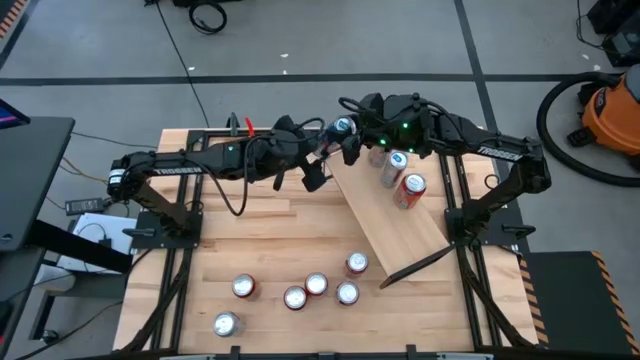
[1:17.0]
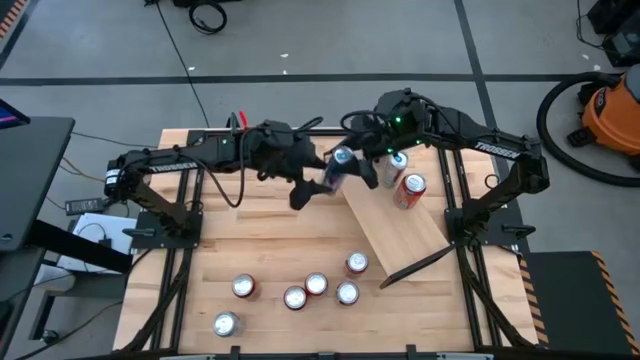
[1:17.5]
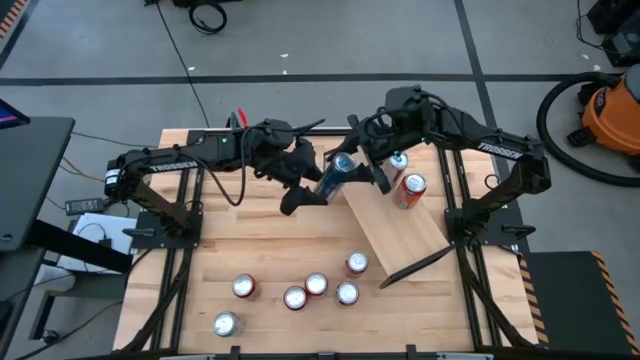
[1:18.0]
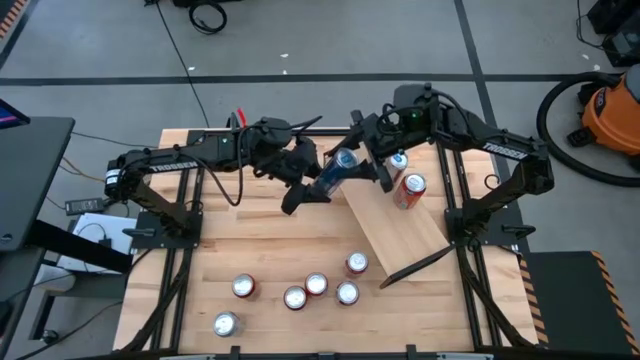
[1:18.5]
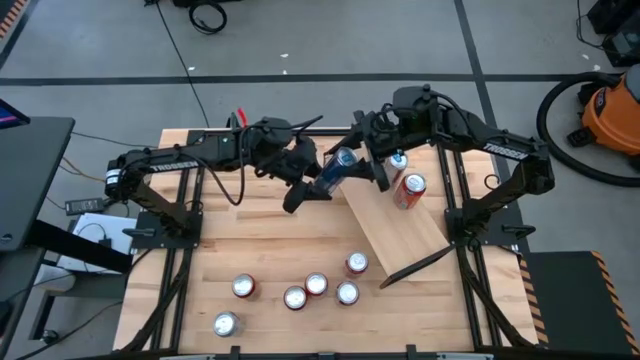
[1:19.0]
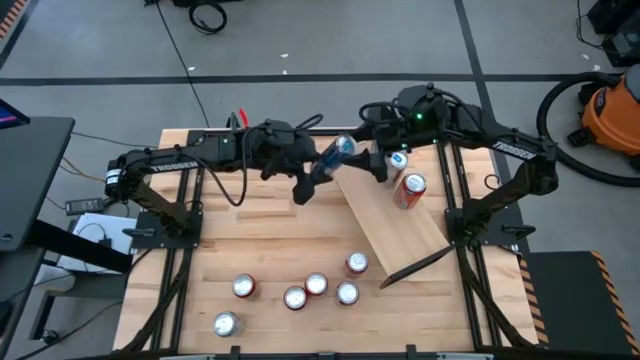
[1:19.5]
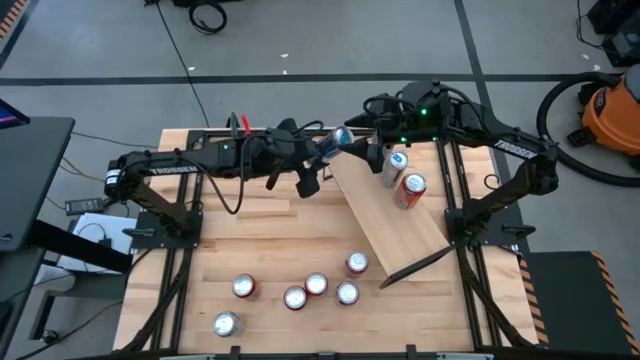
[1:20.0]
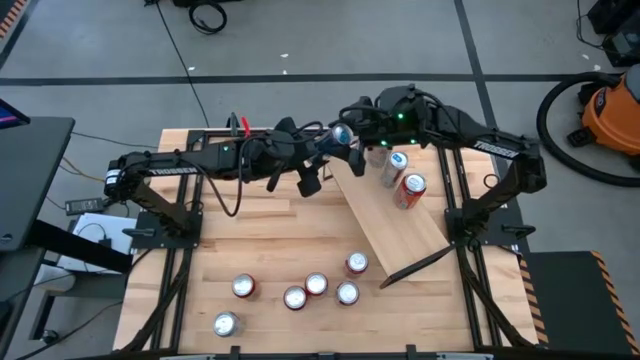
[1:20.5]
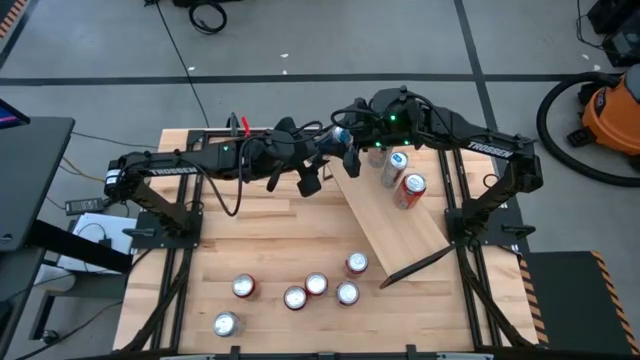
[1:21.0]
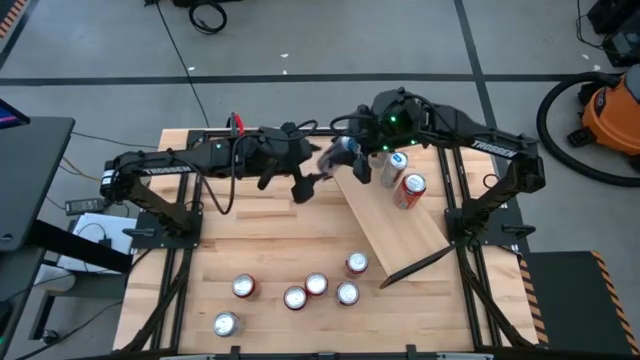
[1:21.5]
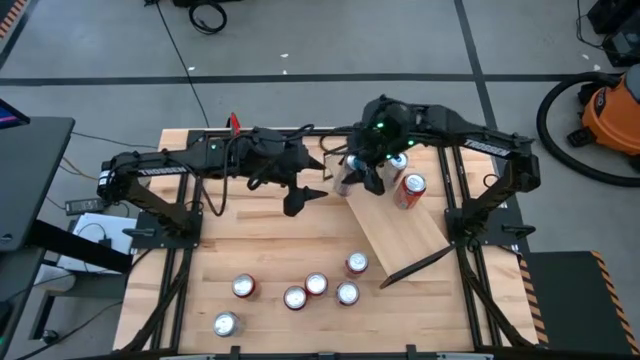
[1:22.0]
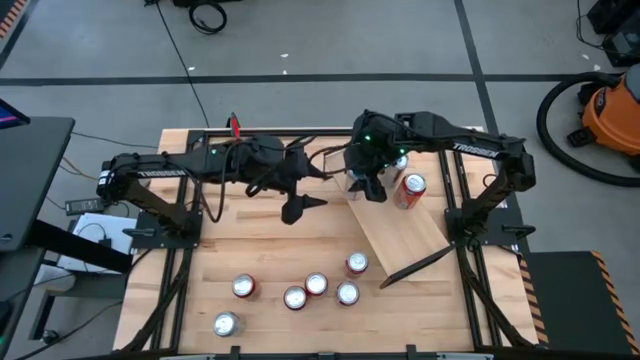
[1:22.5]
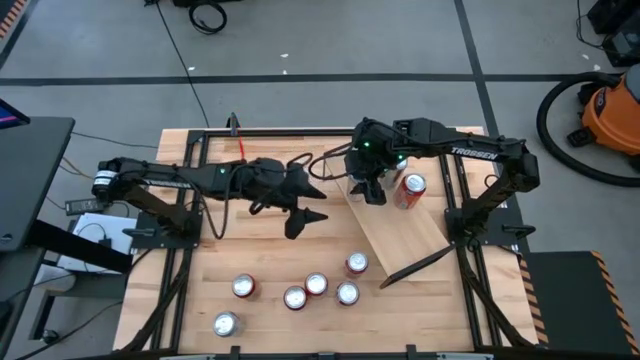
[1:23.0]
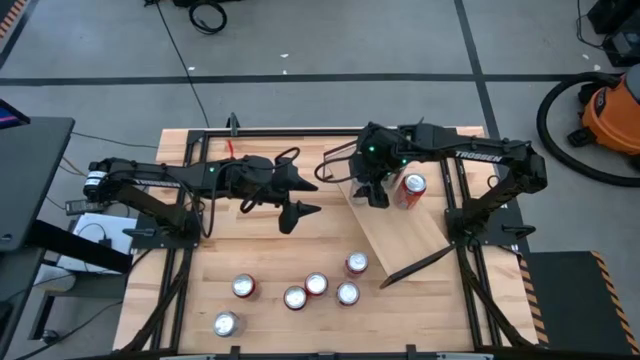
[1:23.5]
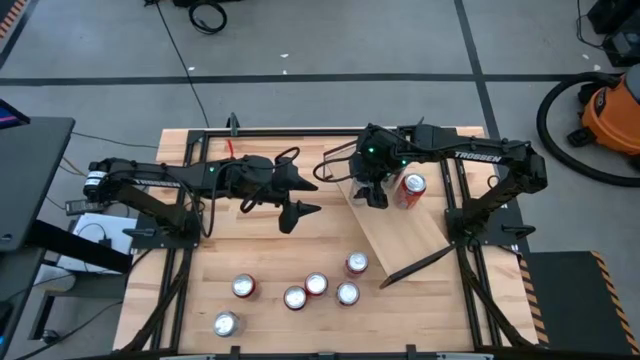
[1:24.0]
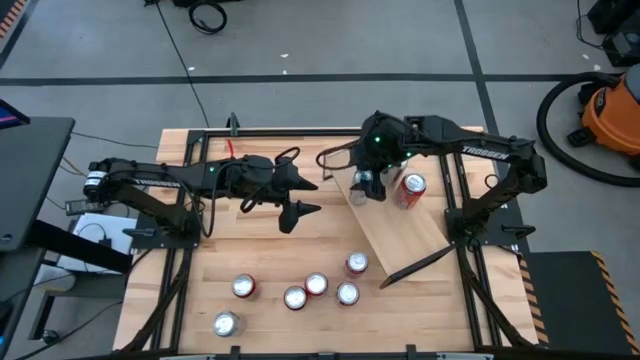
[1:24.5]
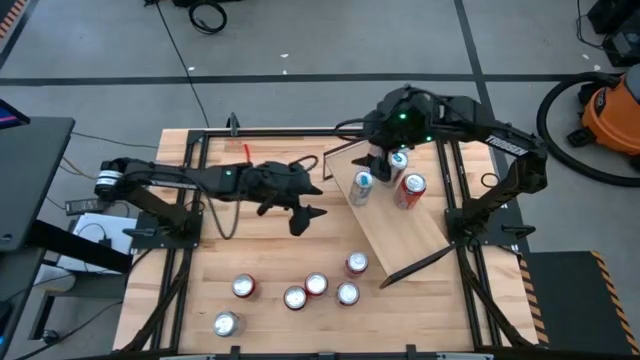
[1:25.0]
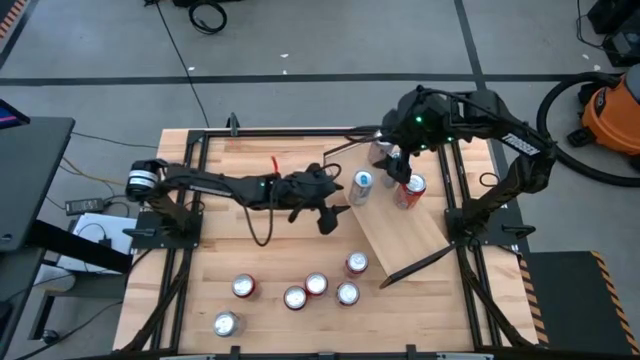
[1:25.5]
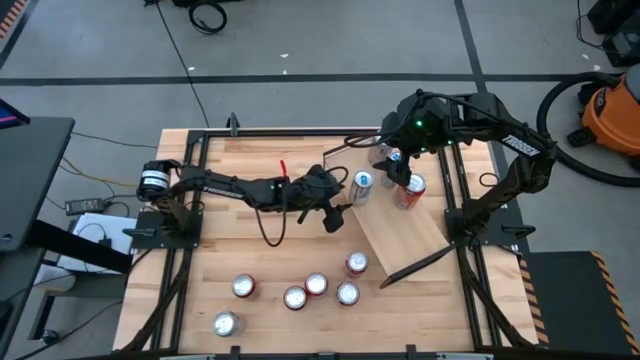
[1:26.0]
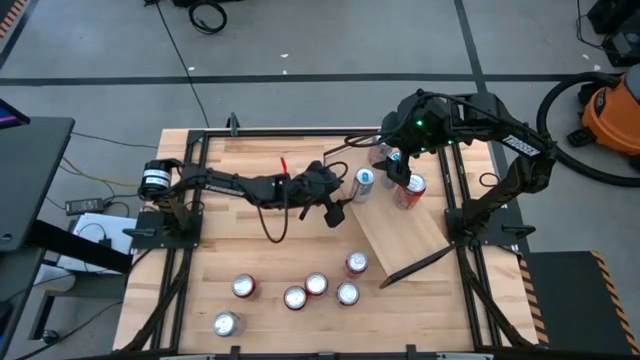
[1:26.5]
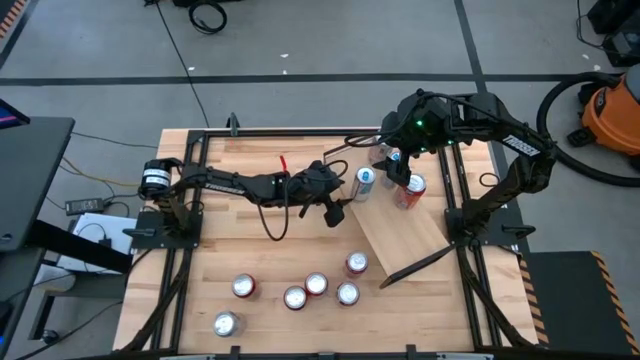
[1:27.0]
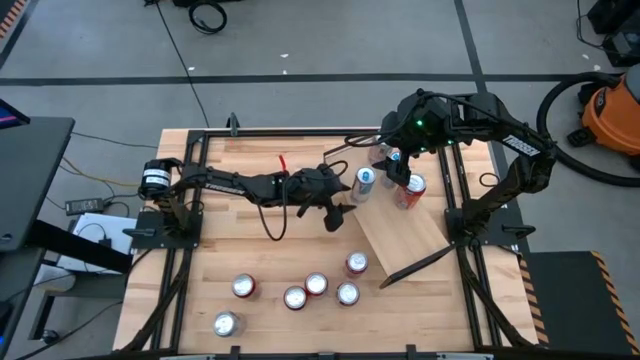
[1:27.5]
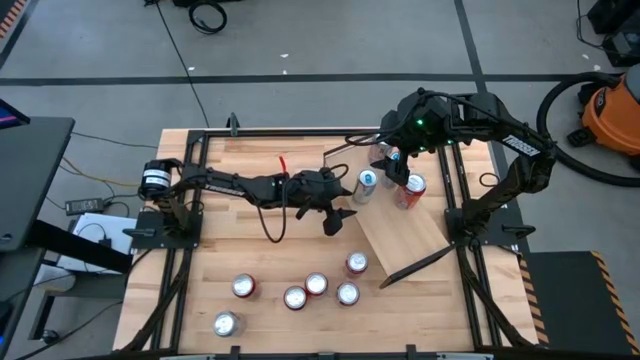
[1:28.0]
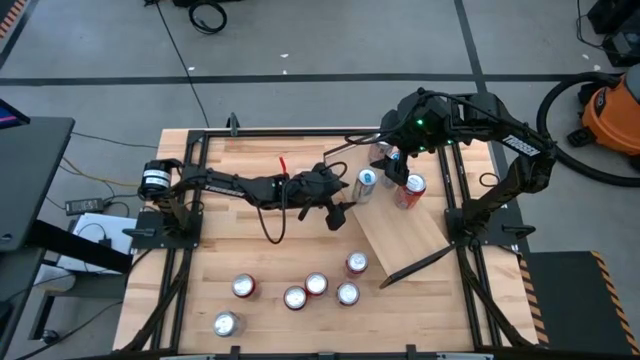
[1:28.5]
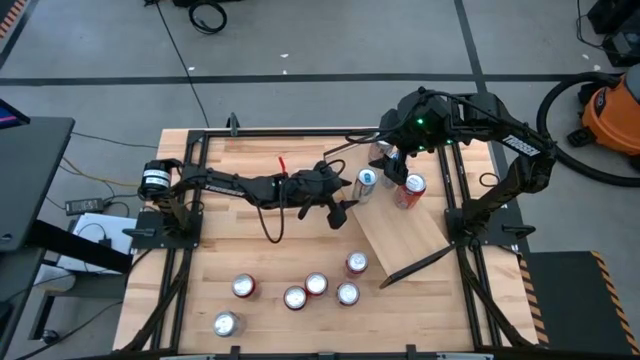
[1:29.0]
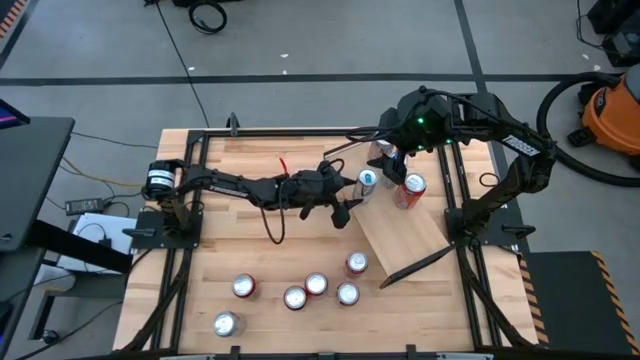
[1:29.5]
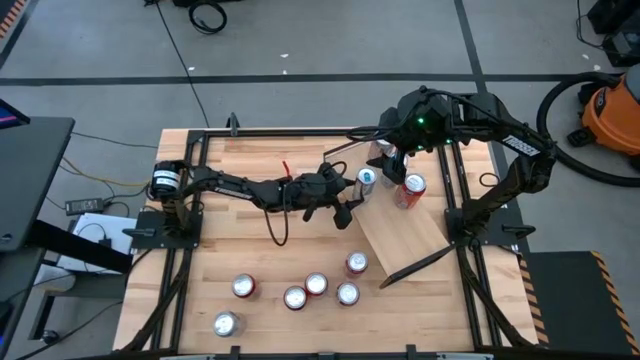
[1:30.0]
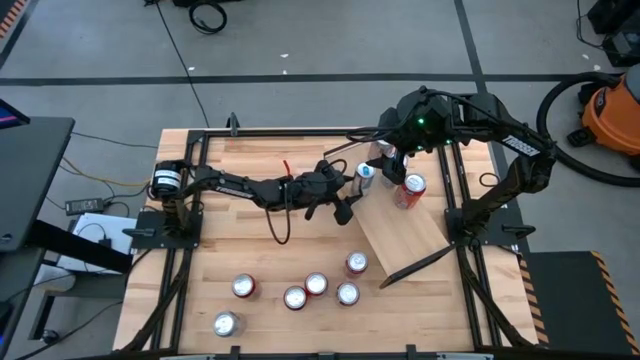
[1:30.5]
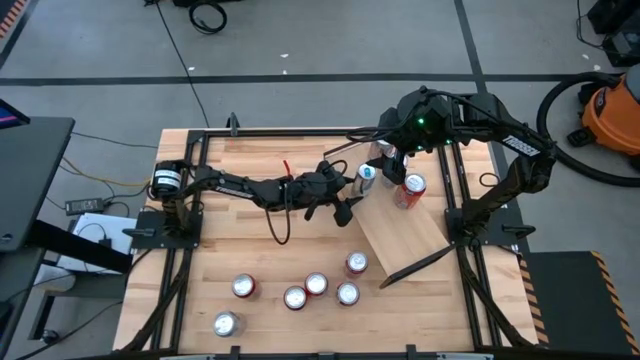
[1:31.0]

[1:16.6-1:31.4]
Task: Place canned beverage on shelf
Put the blue soda can on the shelf aligned with the other blue soda can

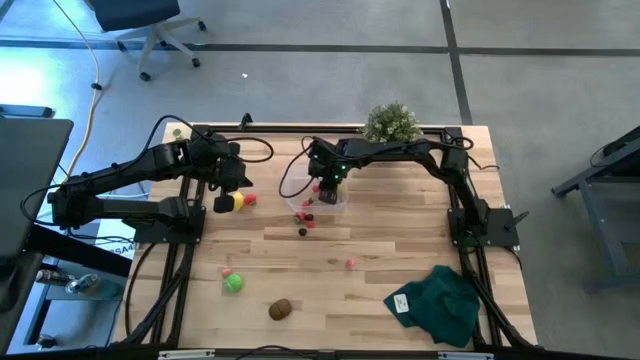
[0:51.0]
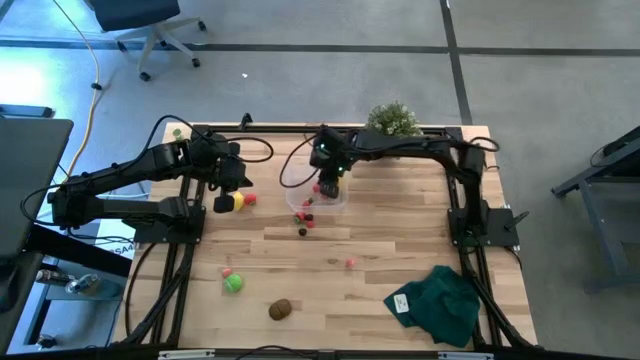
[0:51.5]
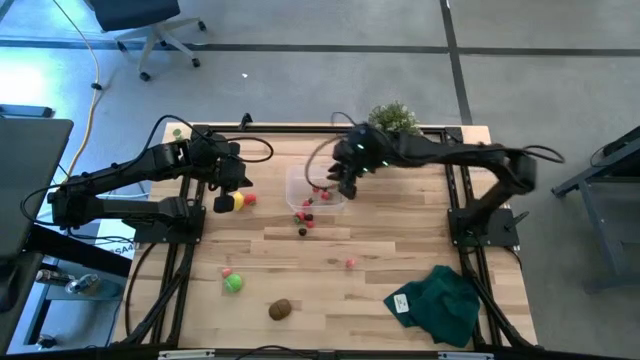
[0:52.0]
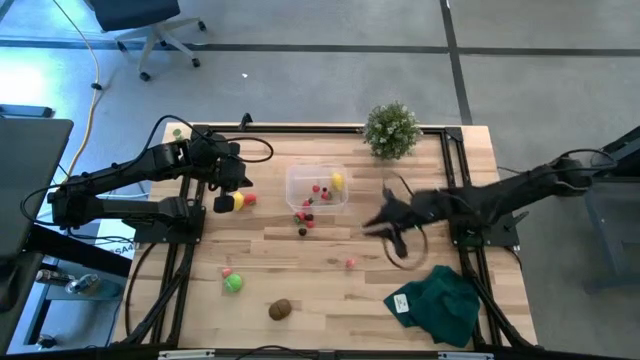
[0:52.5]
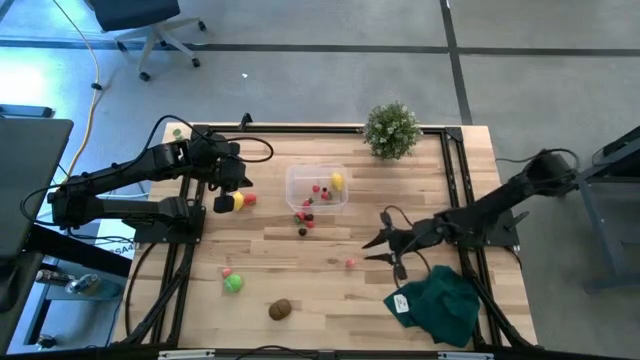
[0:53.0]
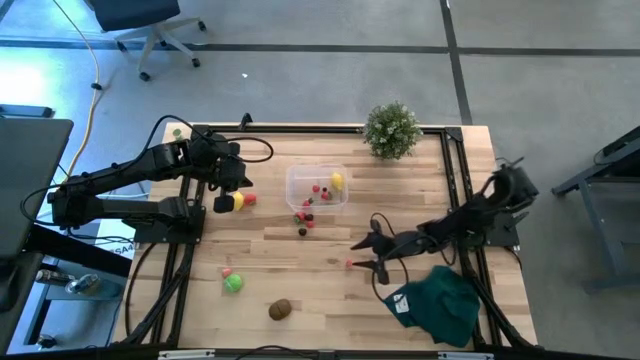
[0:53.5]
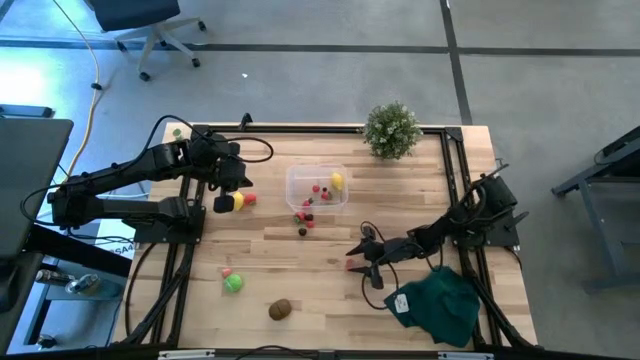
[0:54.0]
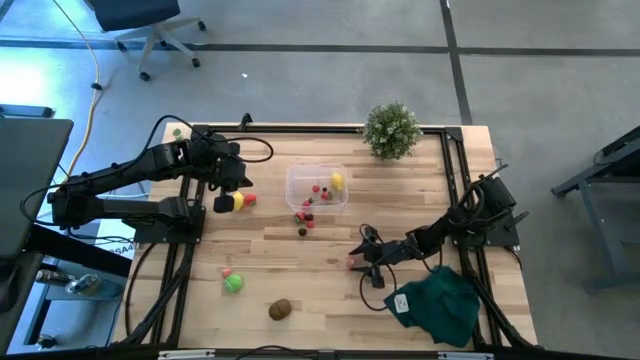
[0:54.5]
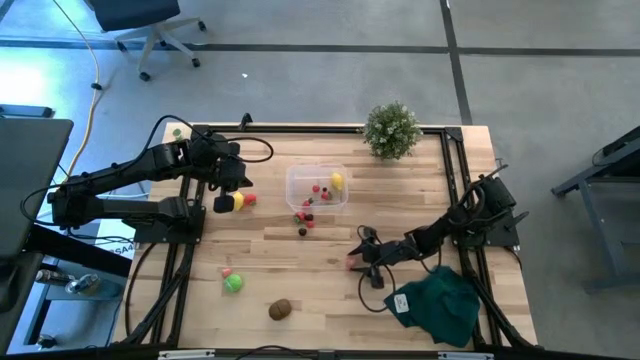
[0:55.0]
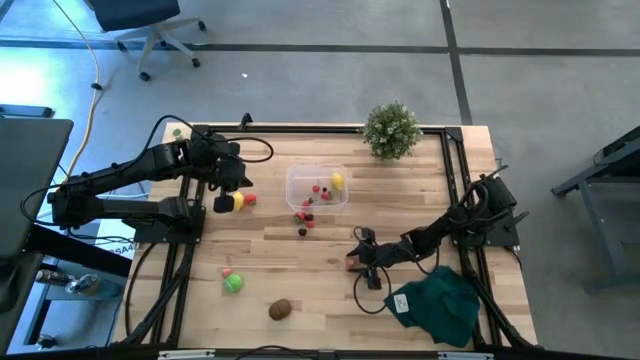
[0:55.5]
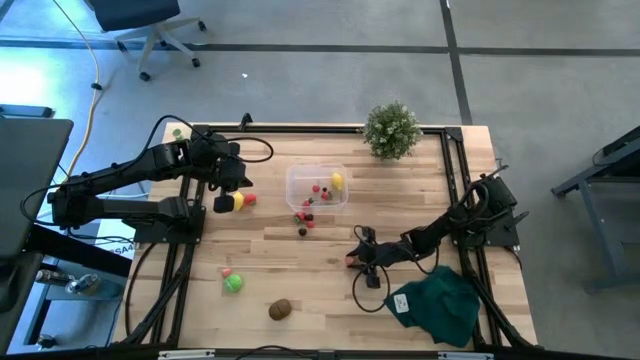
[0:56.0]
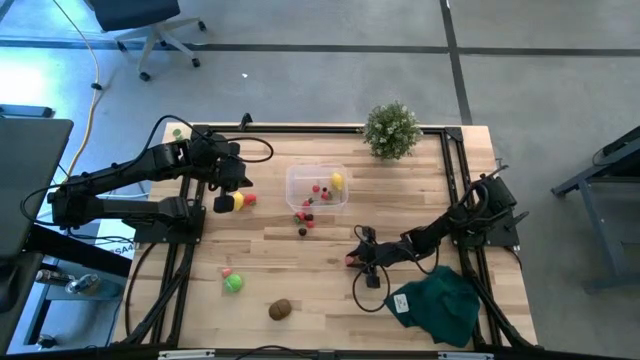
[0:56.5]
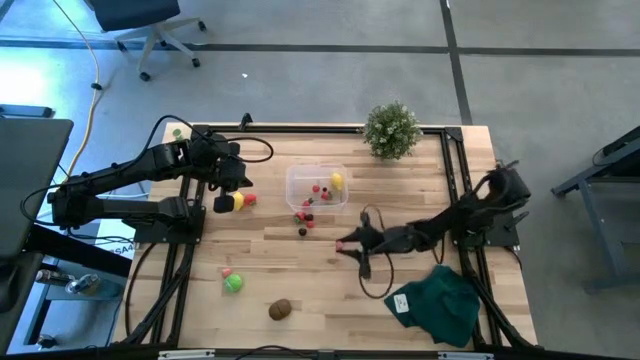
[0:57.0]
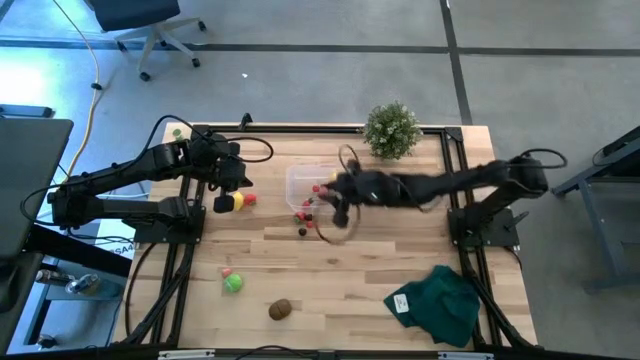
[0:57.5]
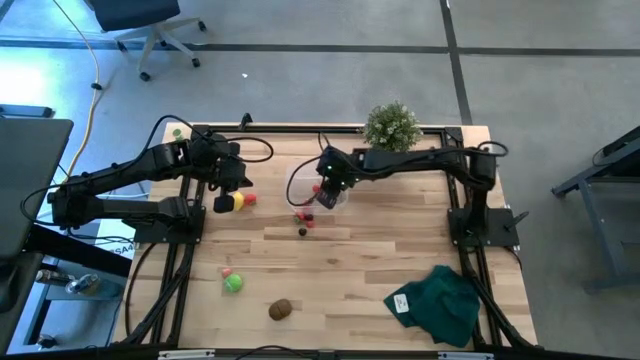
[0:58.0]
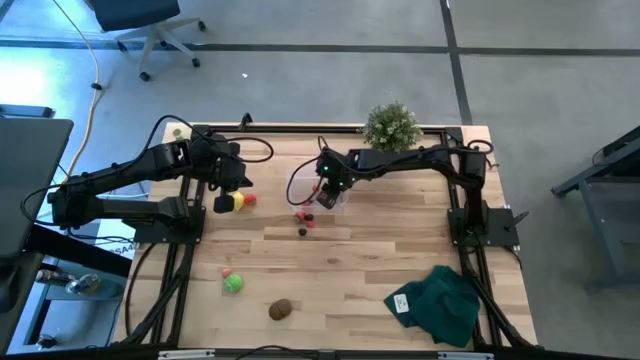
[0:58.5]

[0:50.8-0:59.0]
Task: Pick and placing Produce into tupperware
Put the pink peach into the transparent bin
